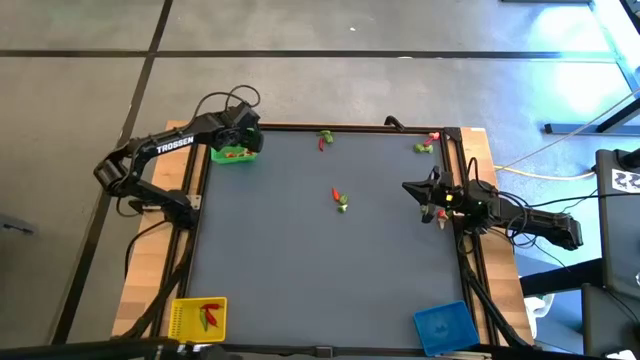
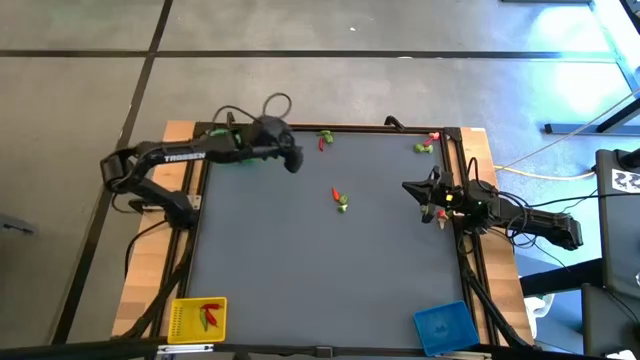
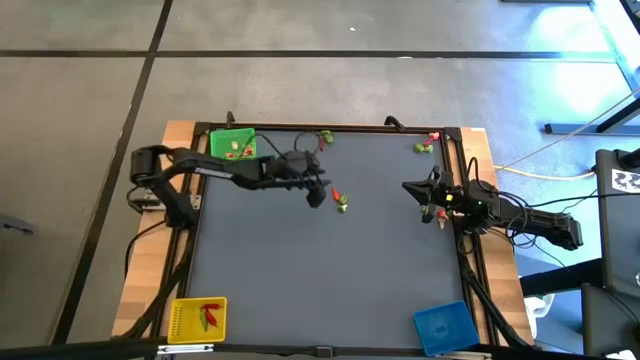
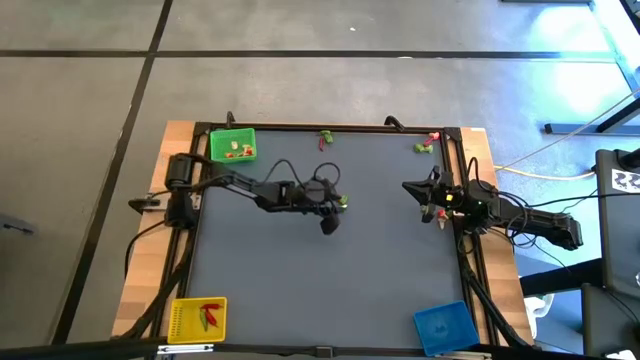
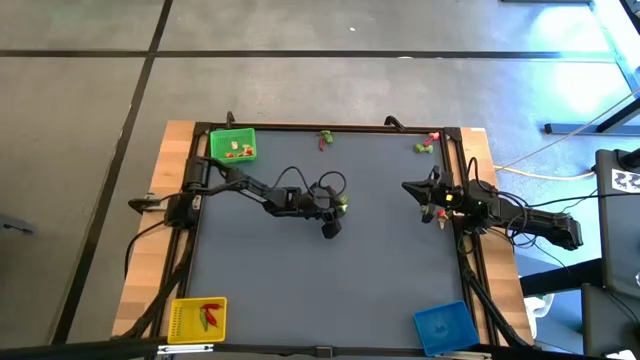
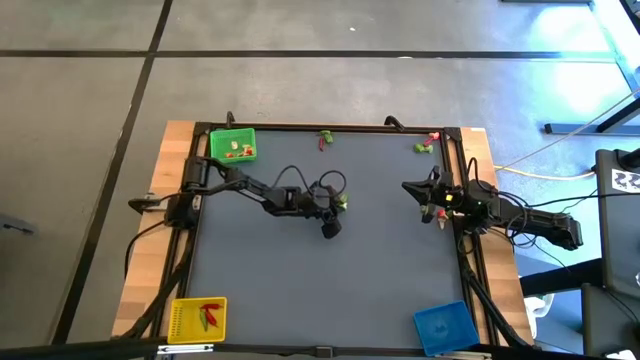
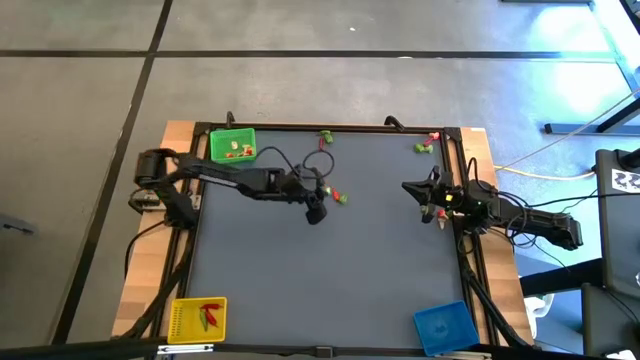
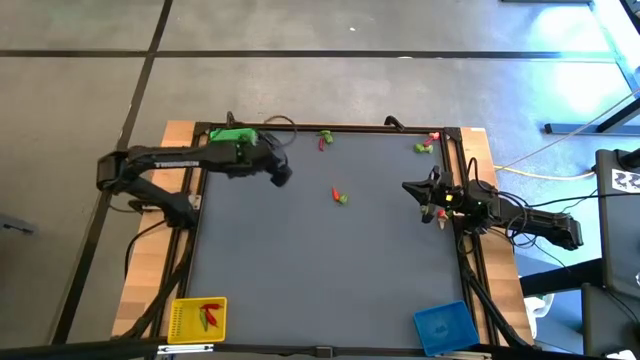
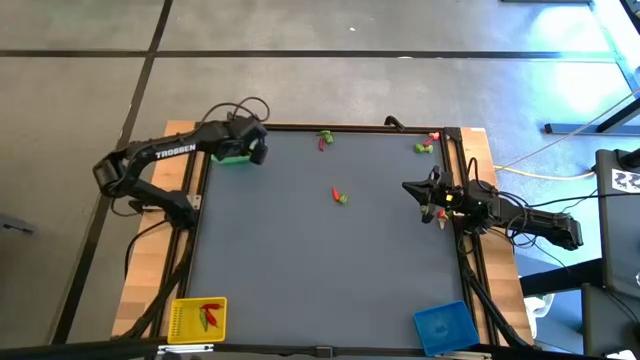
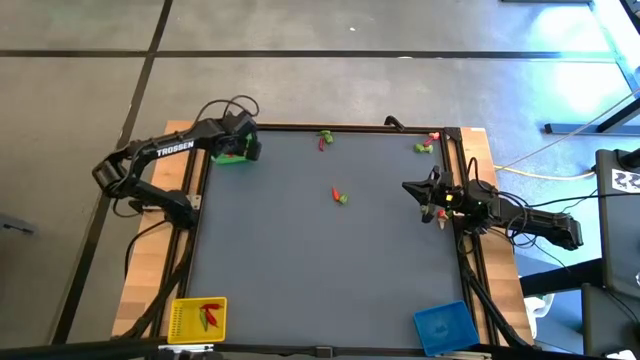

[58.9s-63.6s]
Task: Sort produce into baskets
Put the green mushroom into the green bin

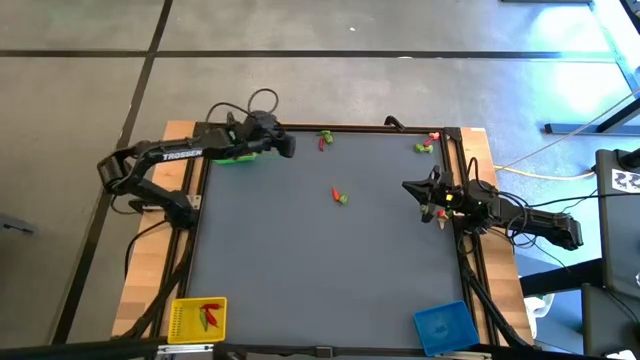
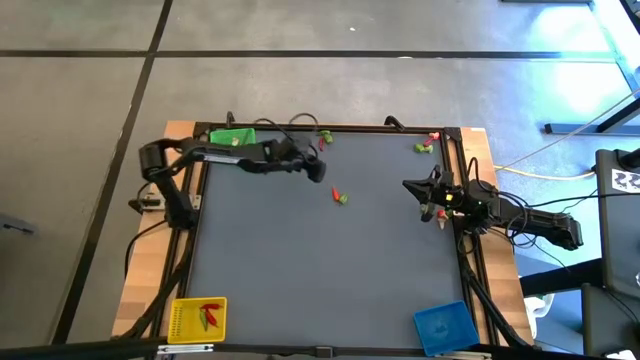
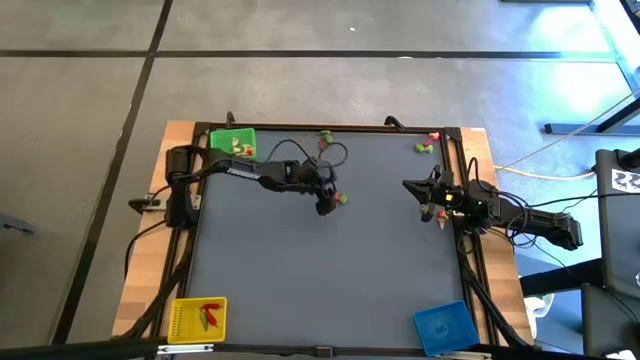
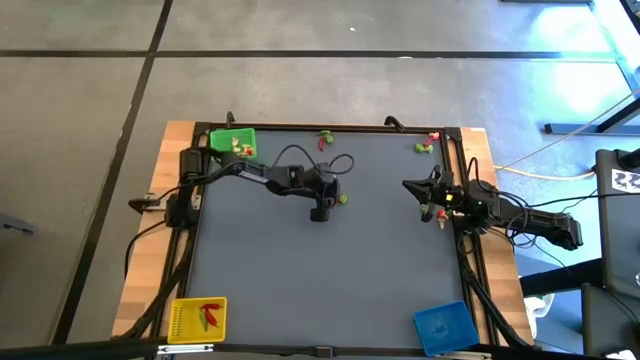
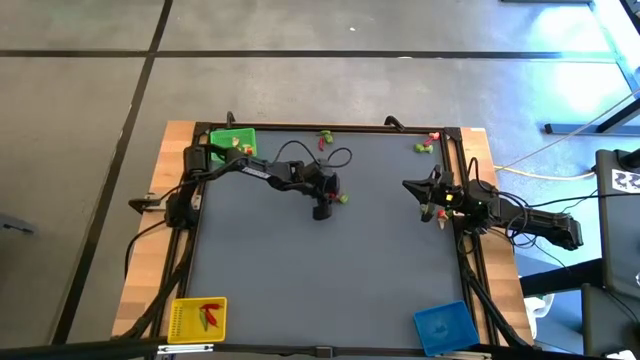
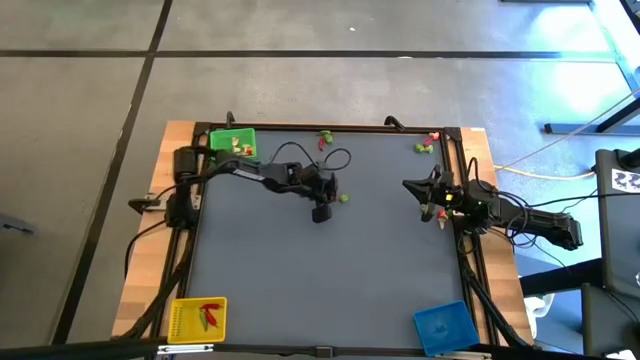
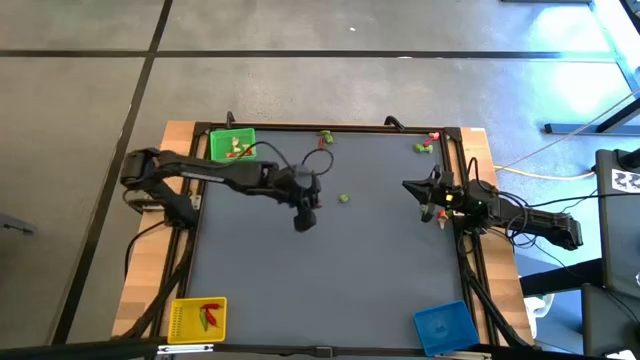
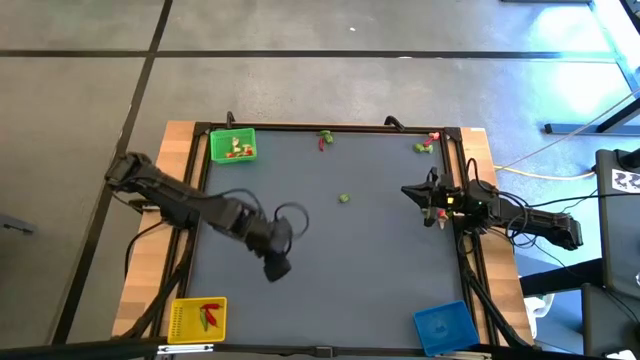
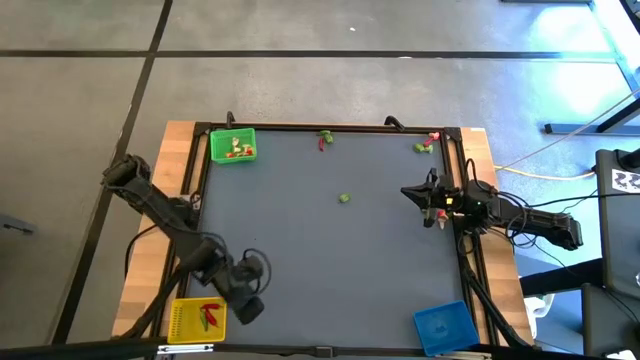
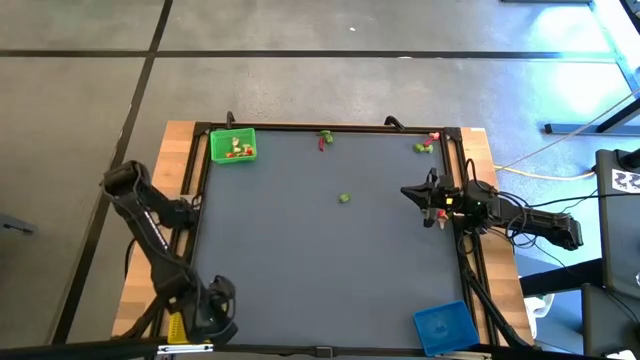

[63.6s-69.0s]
Put the red chili pepper into the yellow bin

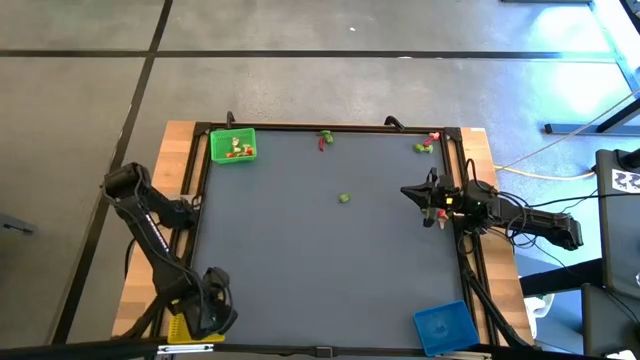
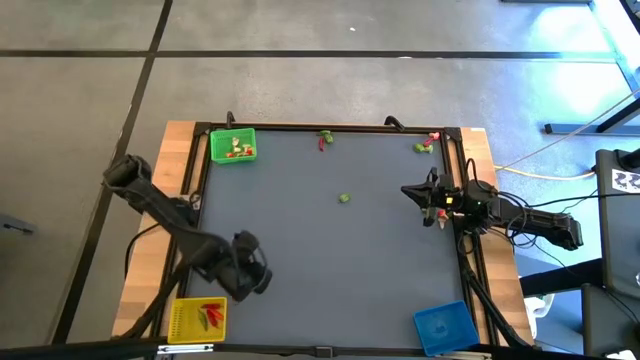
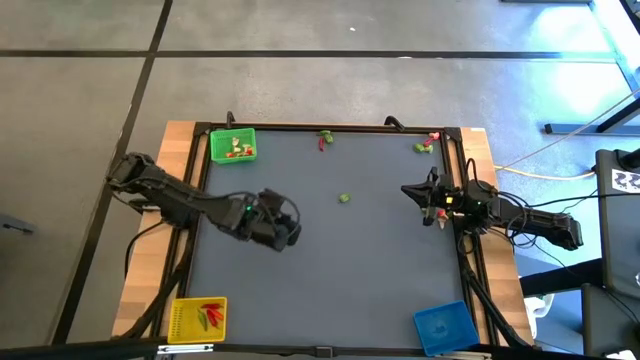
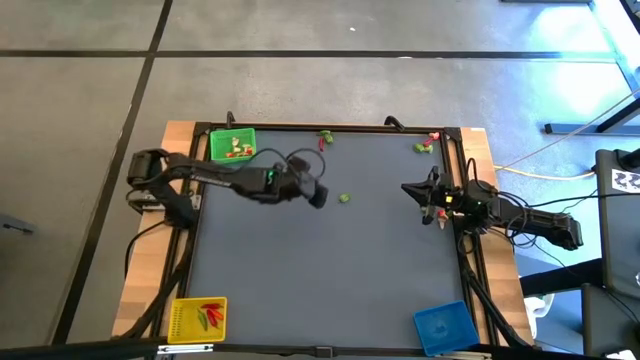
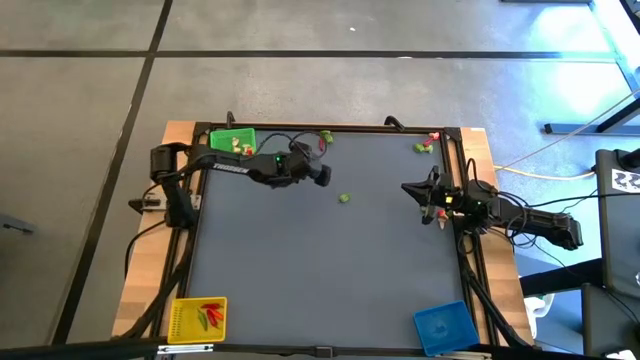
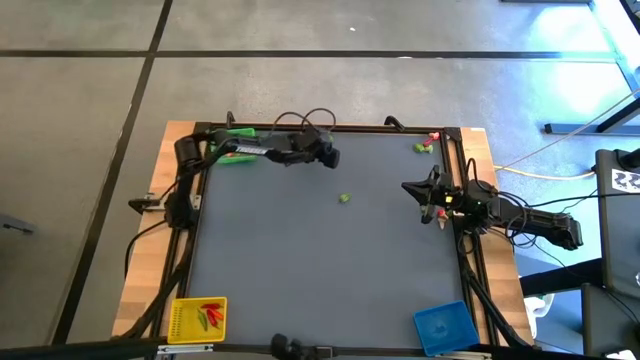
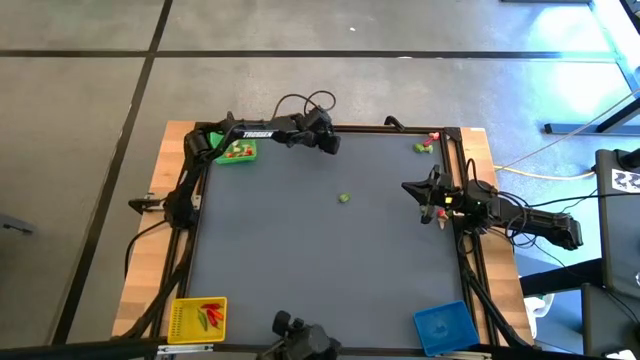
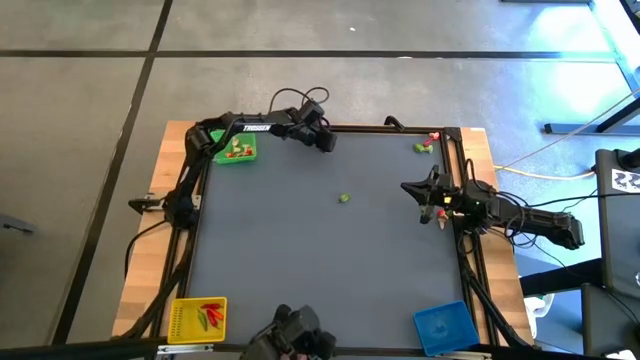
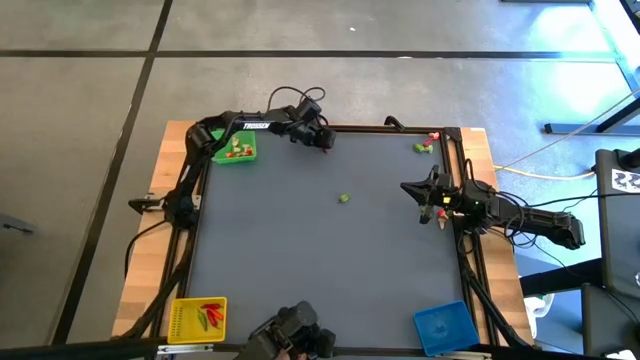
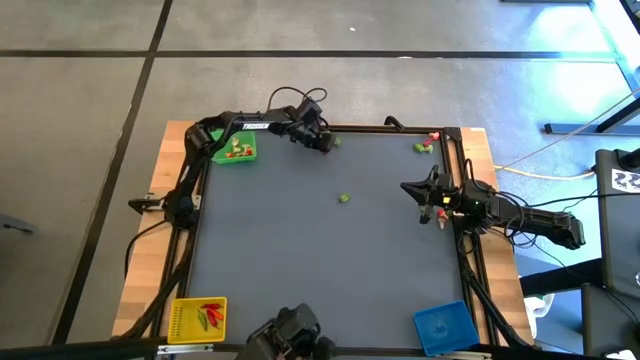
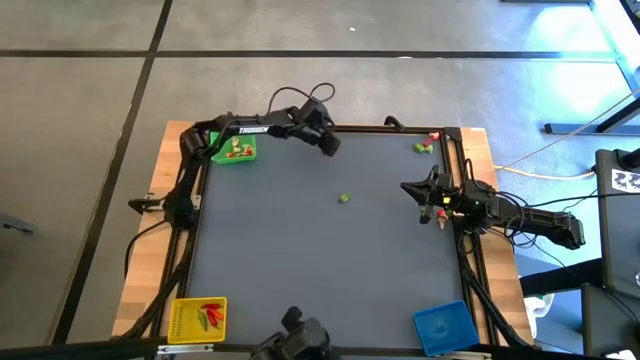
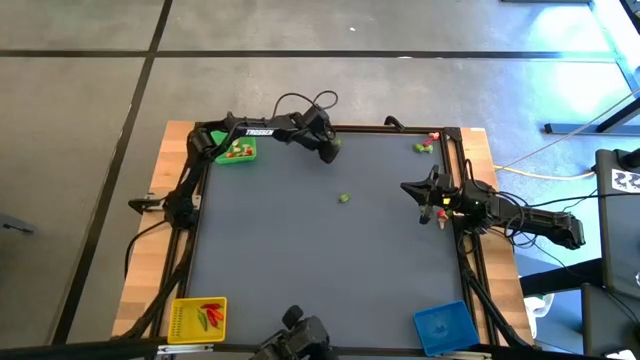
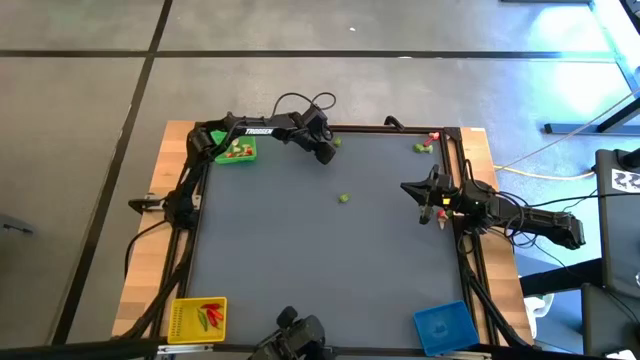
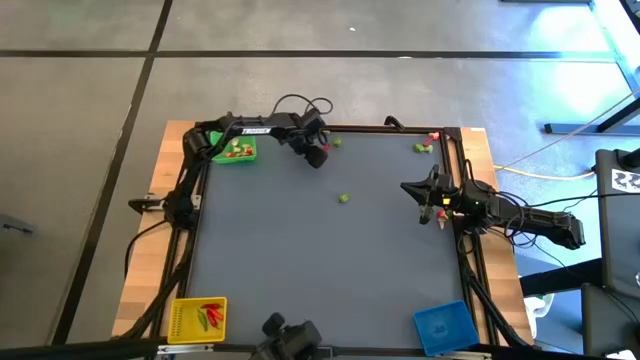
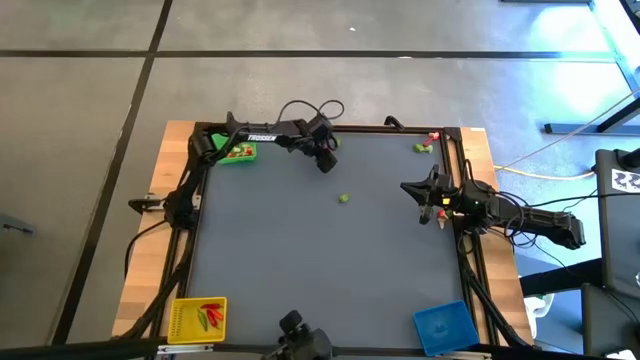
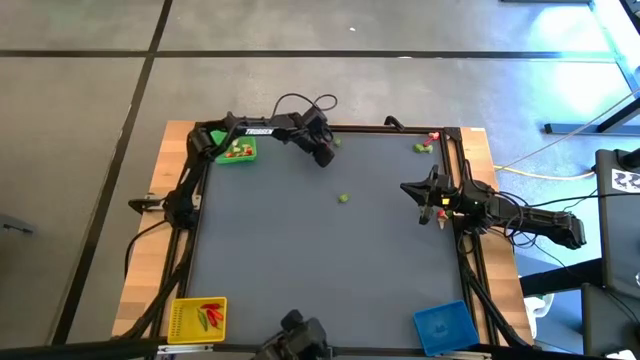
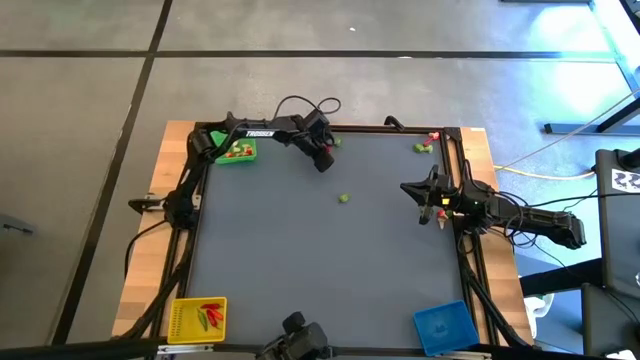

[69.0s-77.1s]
Put the red chili pepper into the yellow bin
